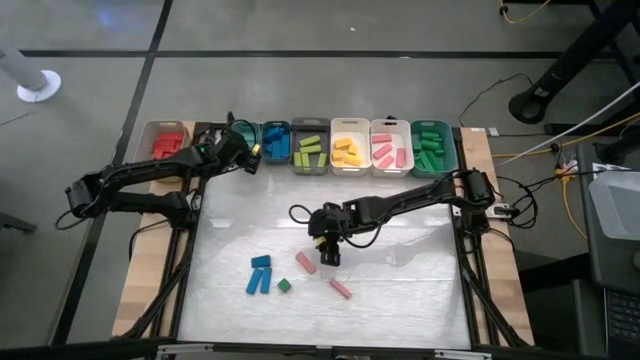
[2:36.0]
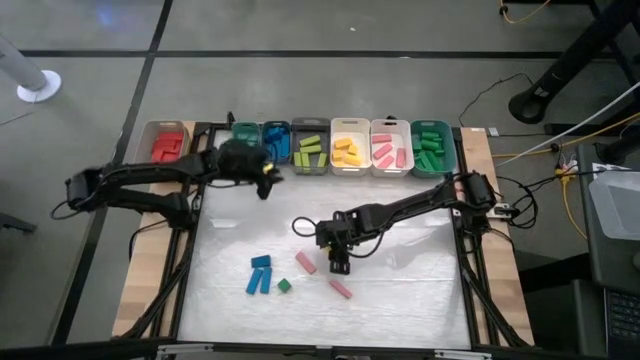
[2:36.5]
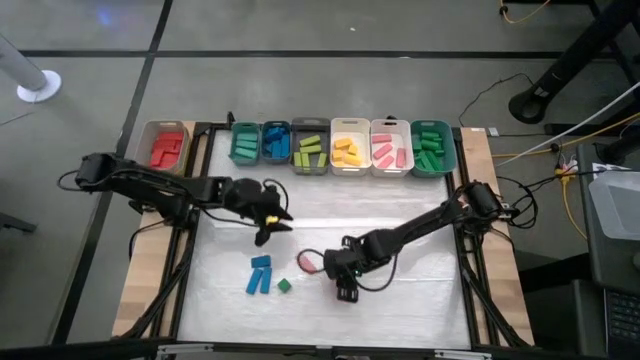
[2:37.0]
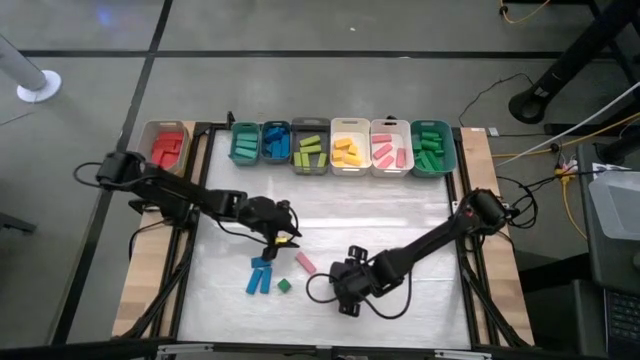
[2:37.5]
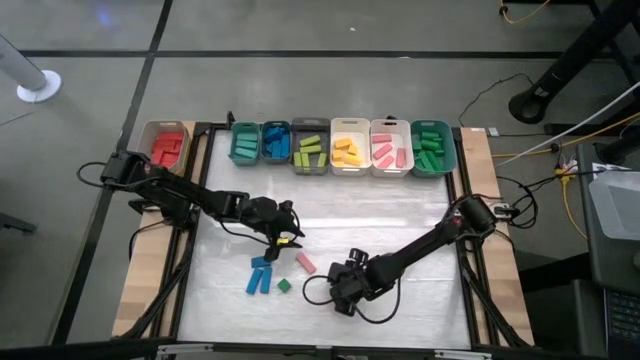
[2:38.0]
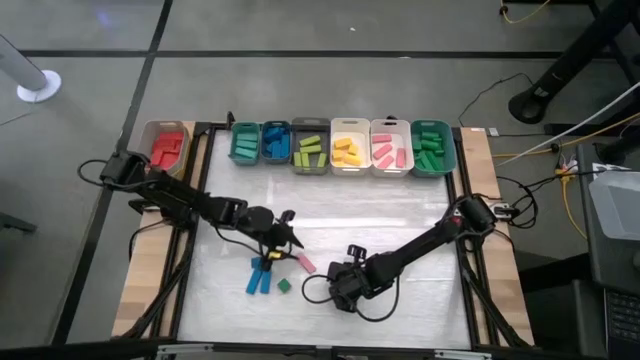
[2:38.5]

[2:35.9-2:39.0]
Task: Sort blocks
Put the pink block into the right white bin

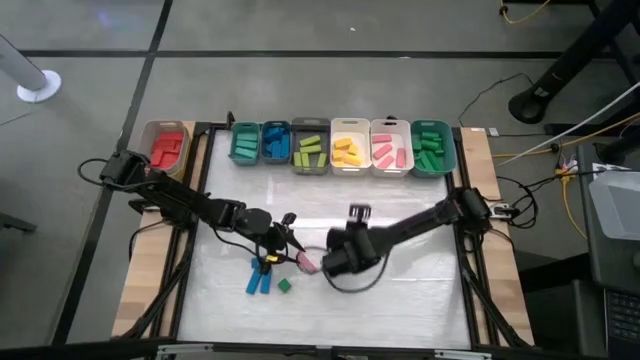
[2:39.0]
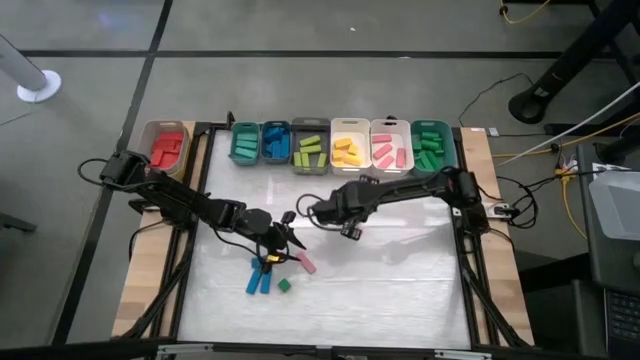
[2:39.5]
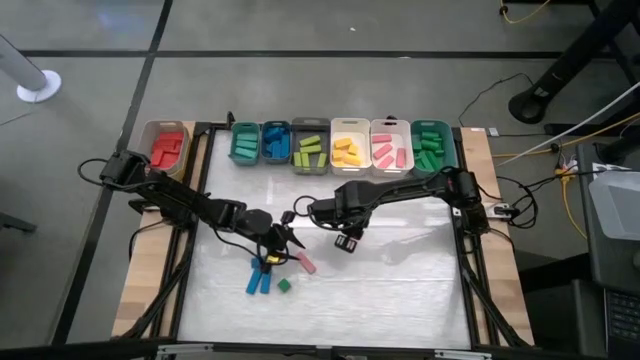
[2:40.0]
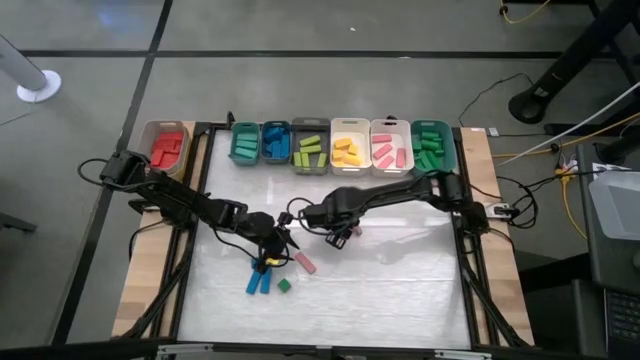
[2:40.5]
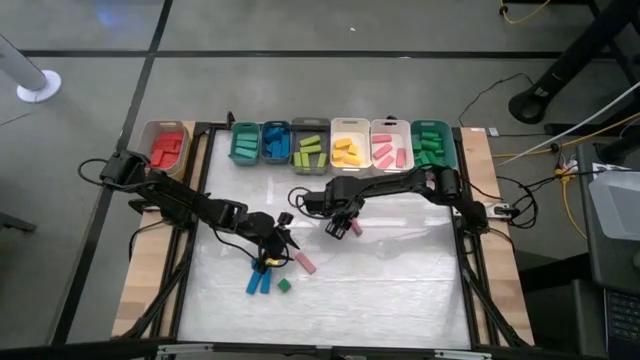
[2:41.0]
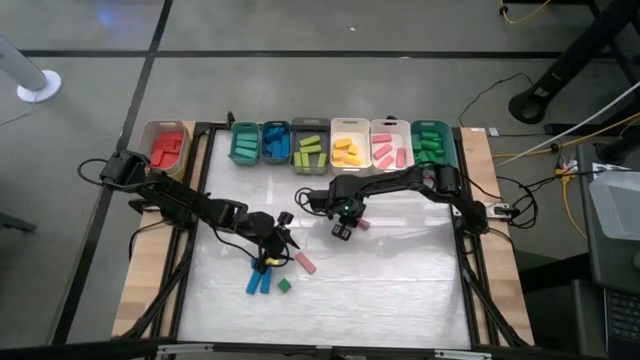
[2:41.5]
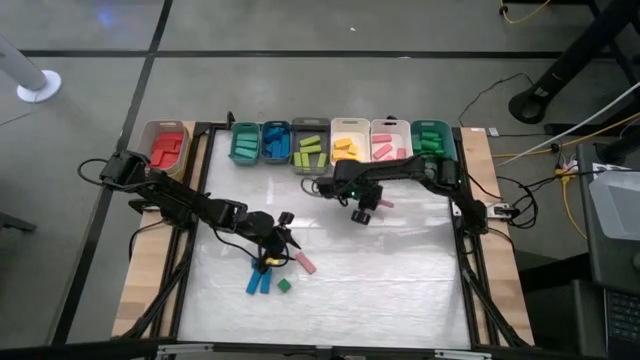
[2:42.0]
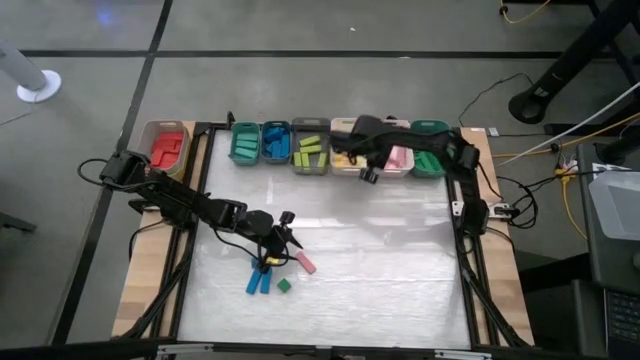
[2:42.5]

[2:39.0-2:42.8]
Put the pink block into the right white bin

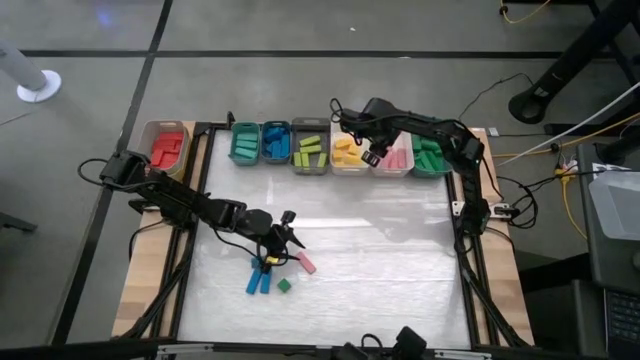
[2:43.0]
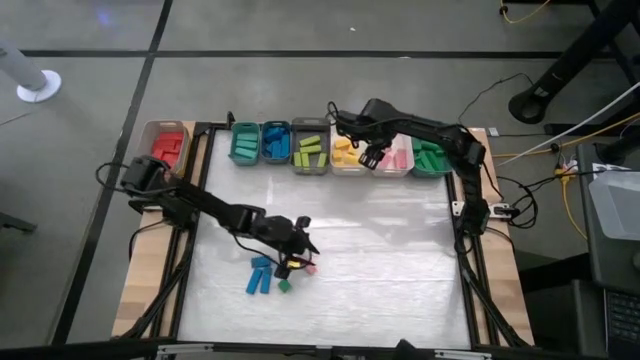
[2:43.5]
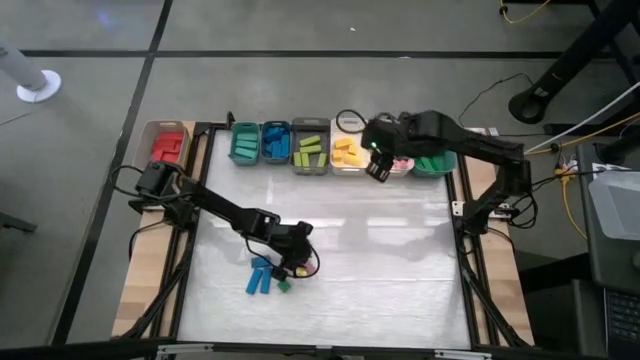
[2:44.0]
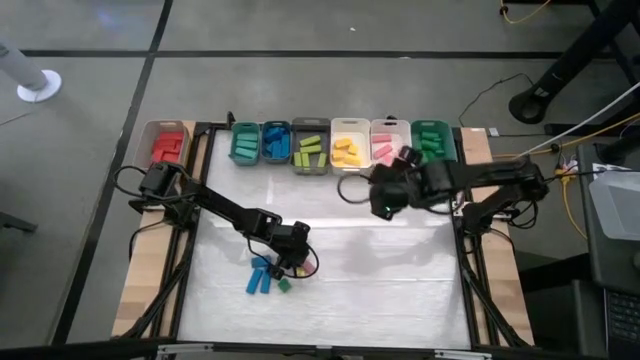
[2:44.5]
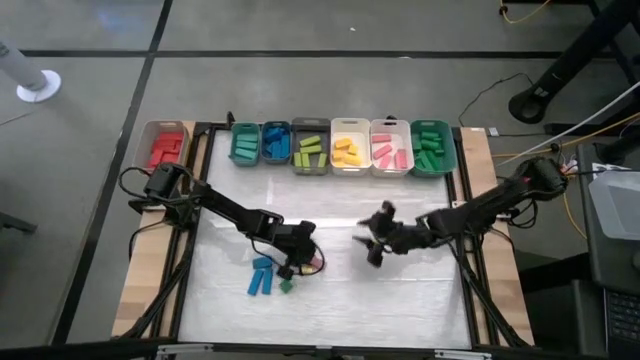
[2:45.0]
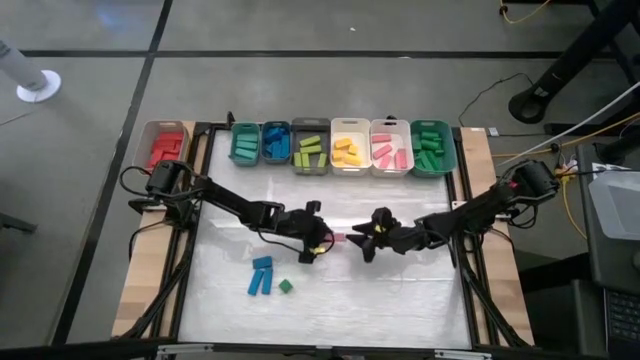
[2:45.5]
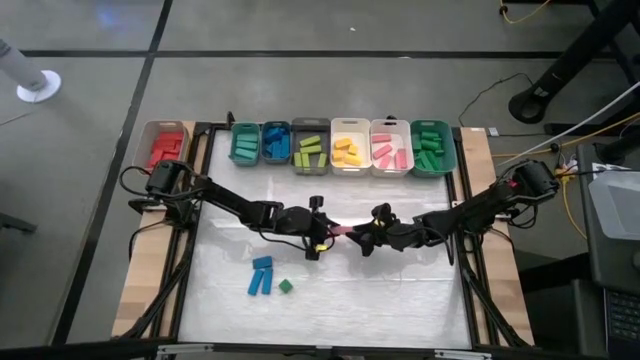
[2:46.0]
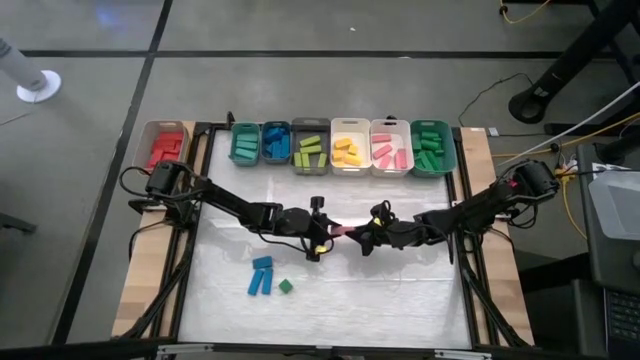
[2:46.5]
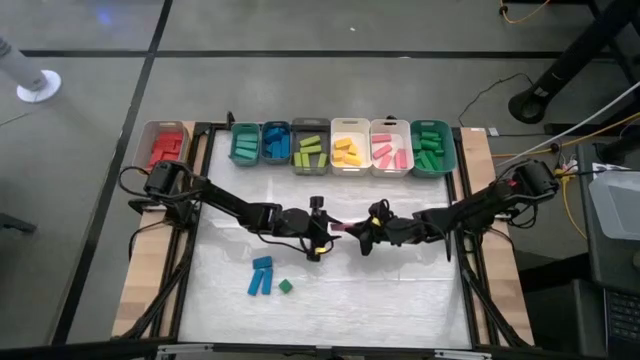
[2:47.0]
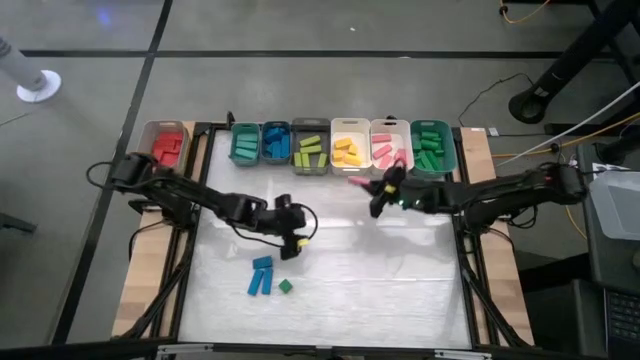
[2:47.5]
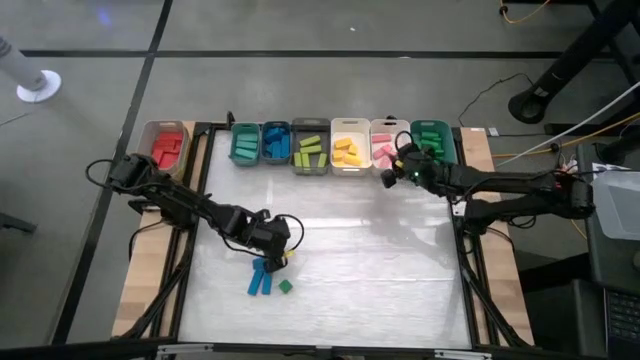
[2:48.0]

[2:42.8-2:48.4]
Put the pink block into the right white bin

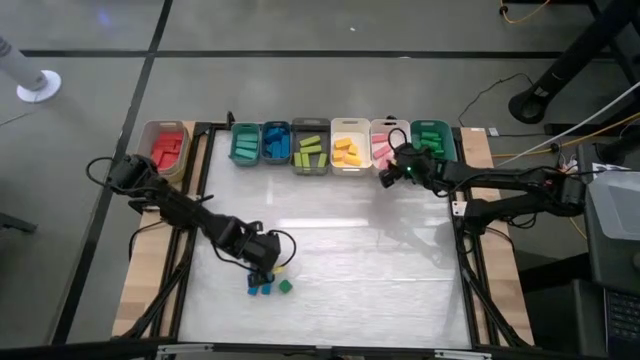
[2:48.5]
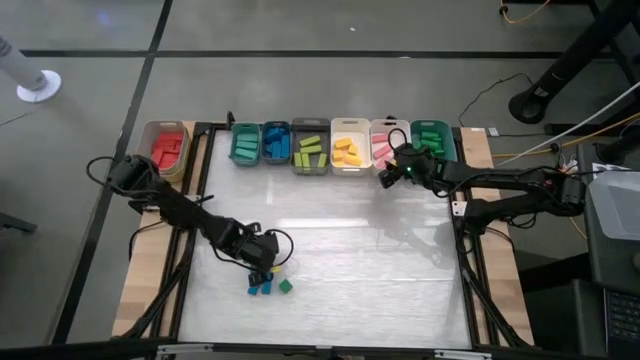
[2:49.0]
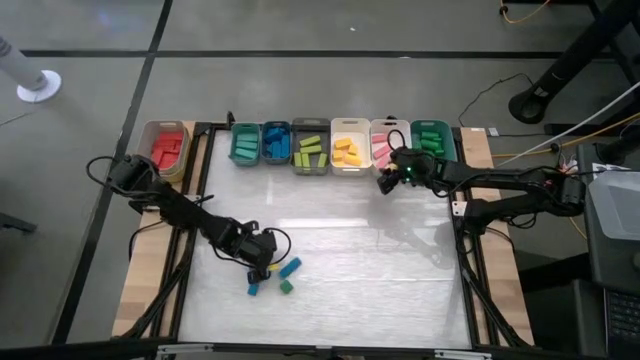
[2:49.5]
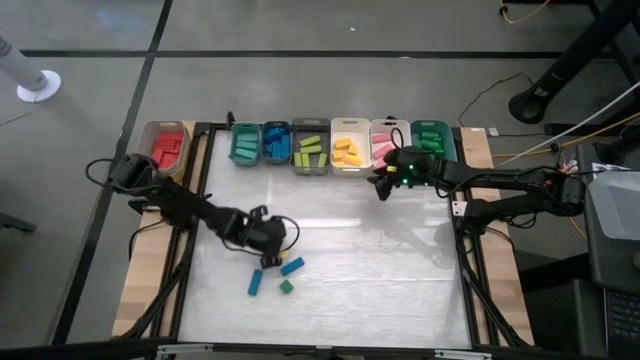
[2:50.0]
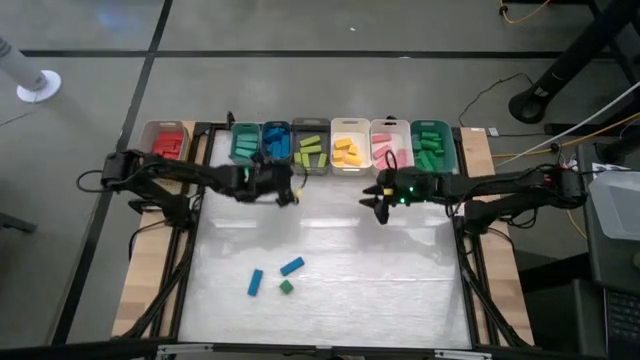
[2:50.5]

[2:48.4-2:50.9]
Put the blue block into the blue bin

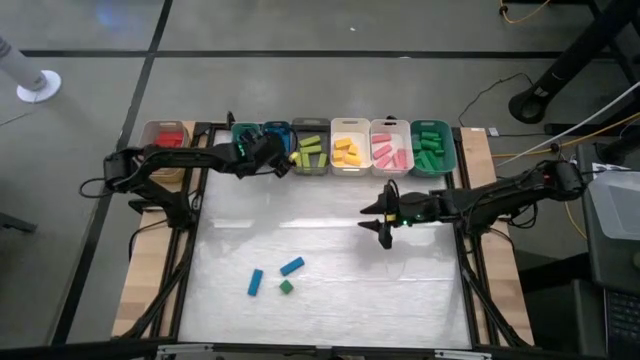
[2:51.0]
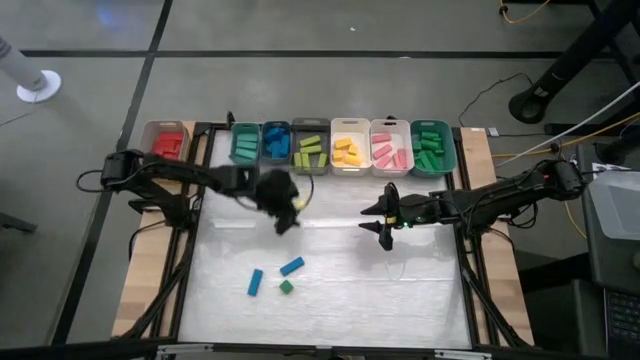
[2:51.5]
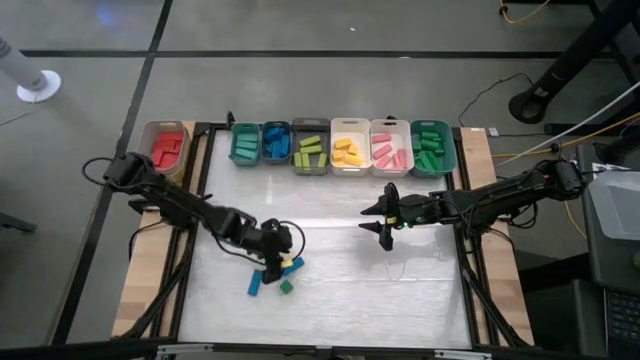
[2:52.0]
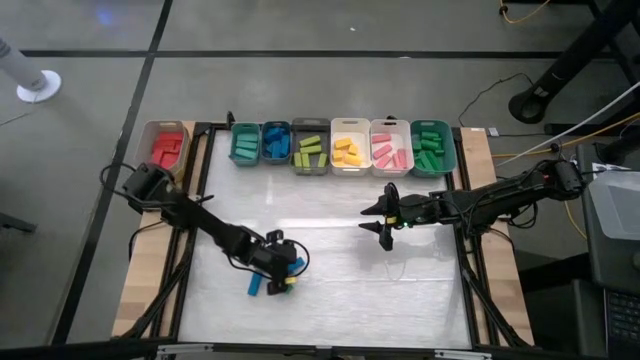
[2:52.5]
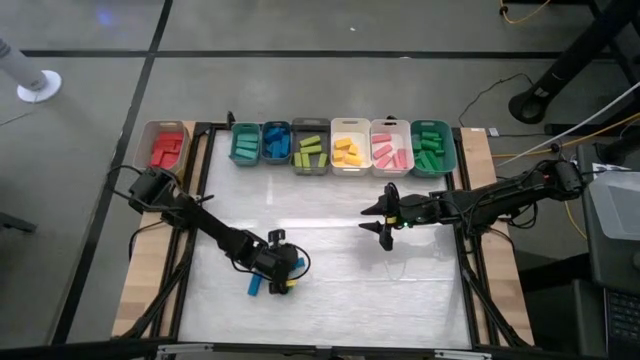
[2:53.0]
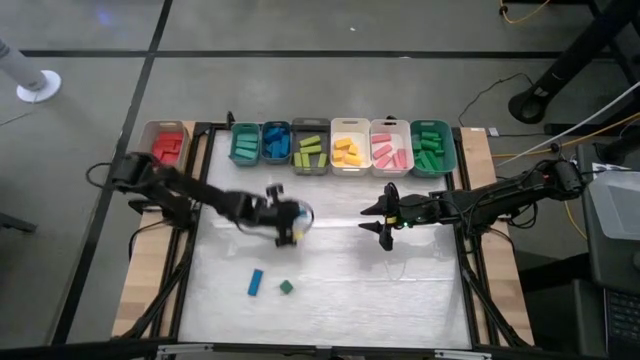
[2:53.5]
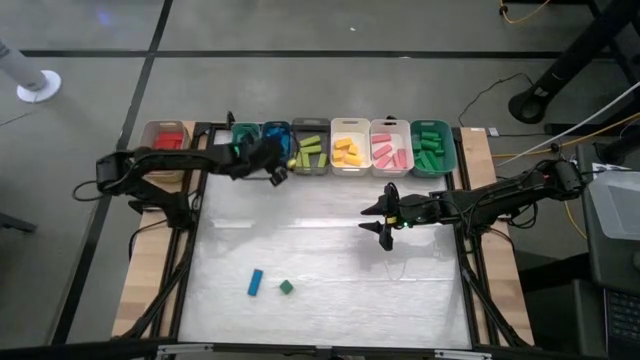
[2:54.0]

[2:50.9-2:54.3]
Put the blue block into the blue bin

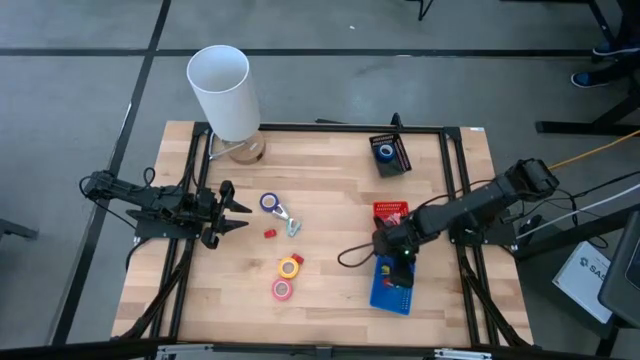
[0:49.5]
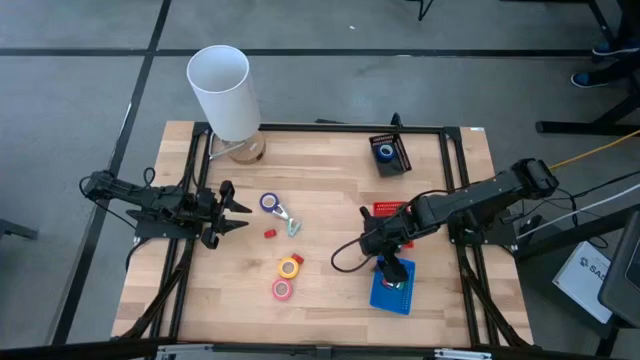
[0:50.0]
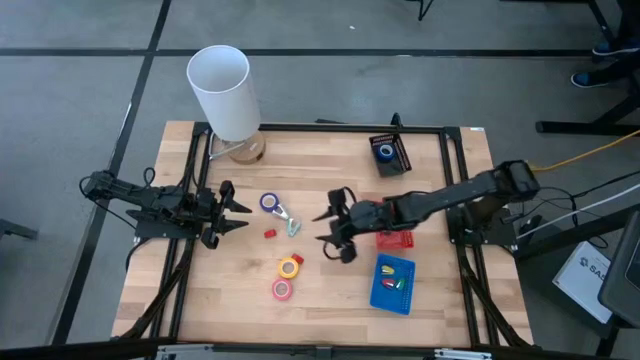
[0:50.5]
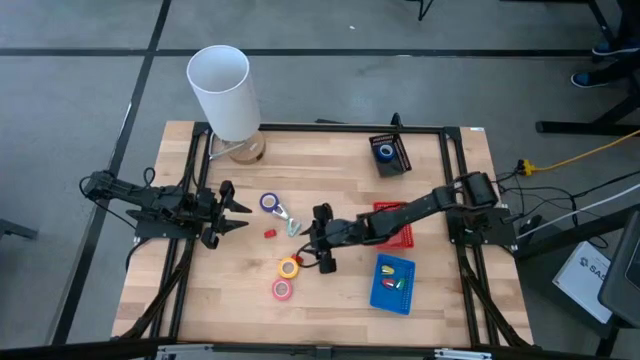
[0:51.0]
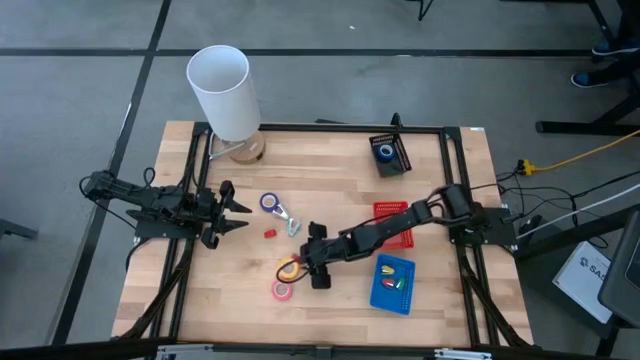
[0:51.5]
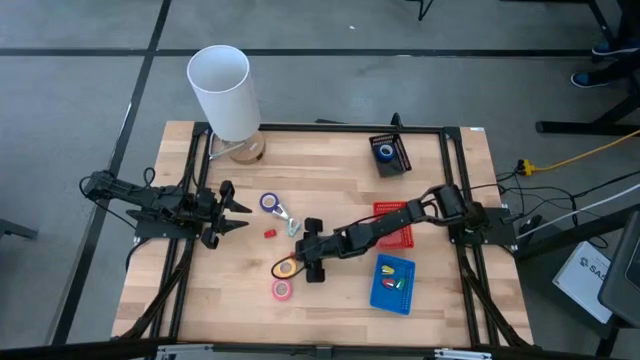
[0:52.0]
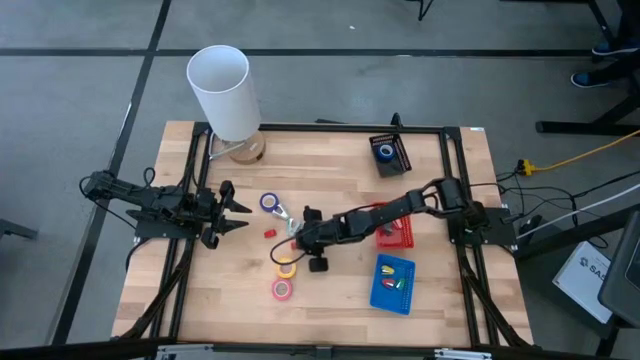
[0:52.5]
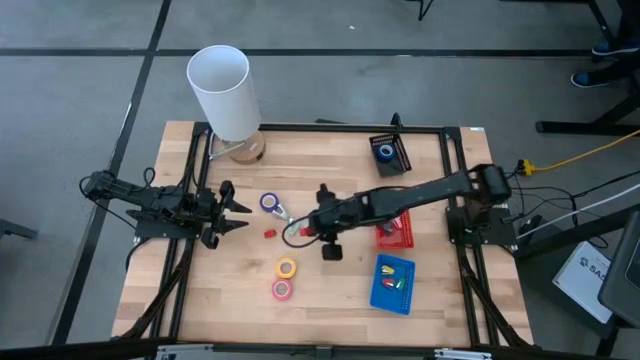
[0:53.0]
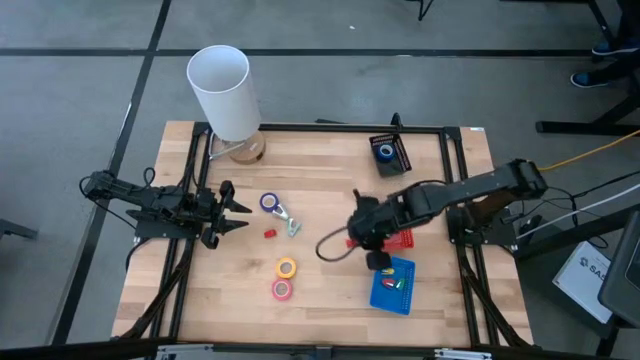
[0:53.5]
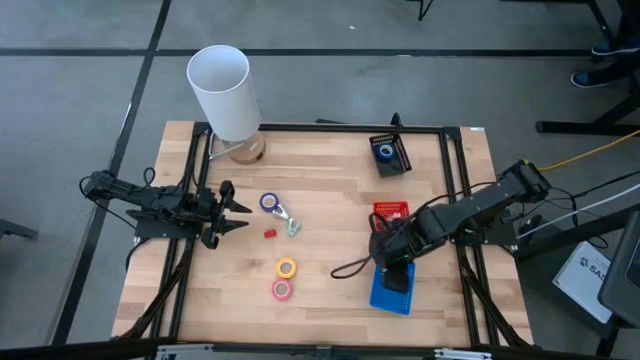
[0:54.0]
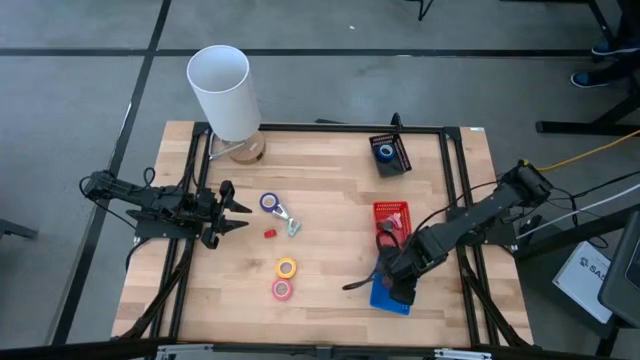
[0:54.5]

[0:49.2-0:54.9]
Task: Pick and place Stapler, Stapler remover, tape
Put the bottom red stapler into the blue basket
